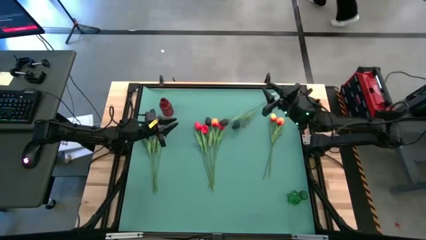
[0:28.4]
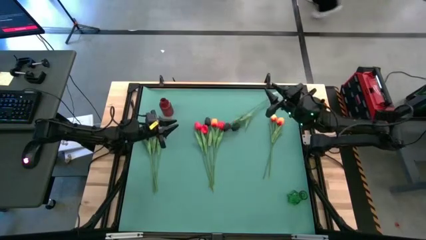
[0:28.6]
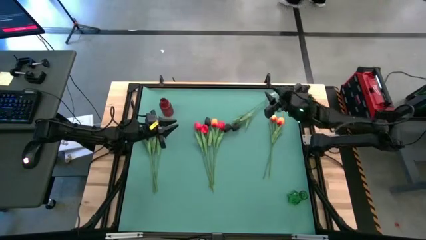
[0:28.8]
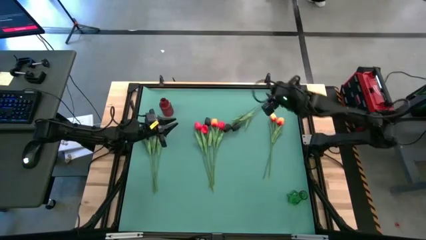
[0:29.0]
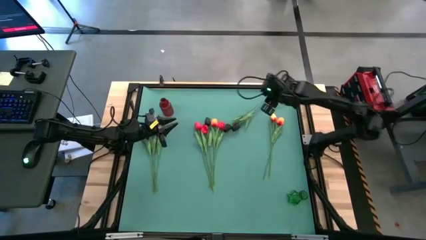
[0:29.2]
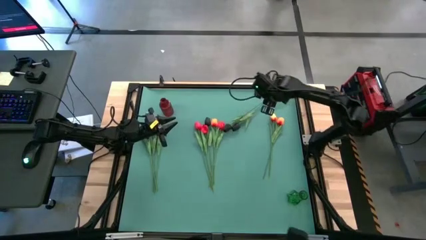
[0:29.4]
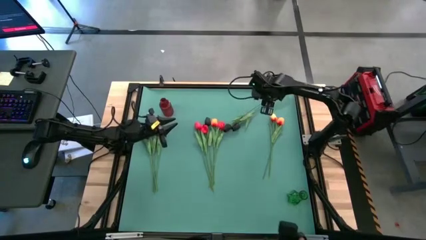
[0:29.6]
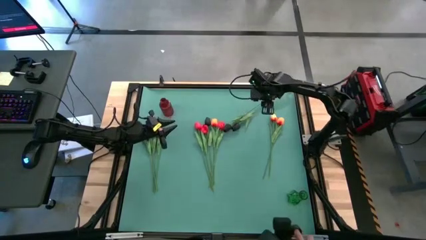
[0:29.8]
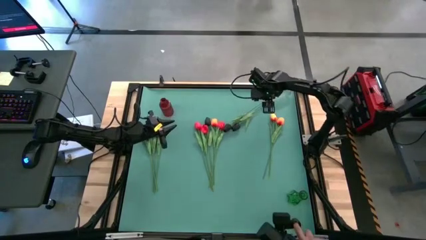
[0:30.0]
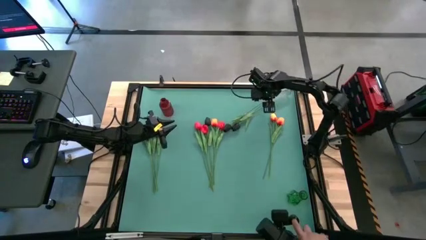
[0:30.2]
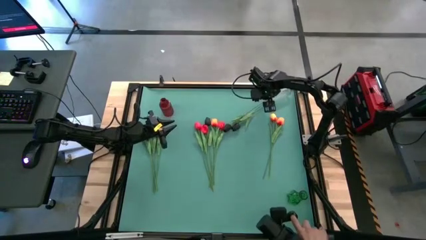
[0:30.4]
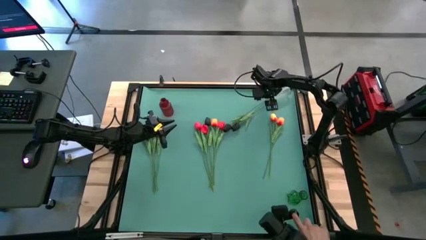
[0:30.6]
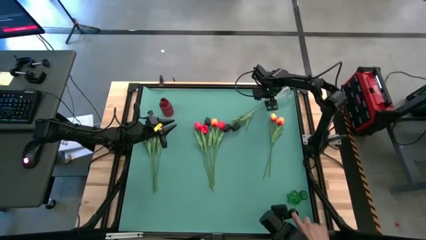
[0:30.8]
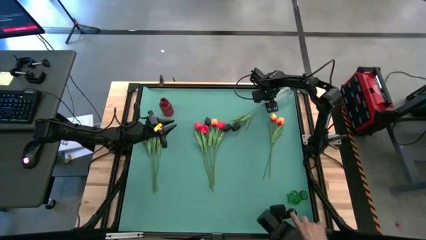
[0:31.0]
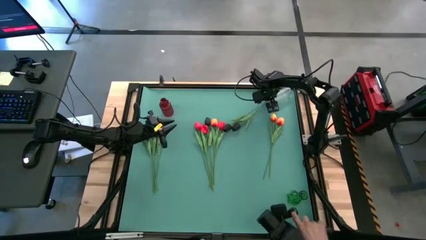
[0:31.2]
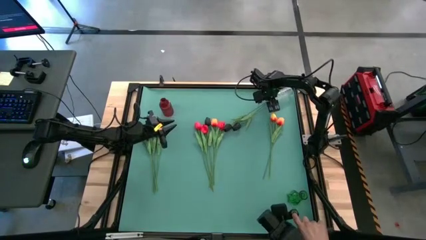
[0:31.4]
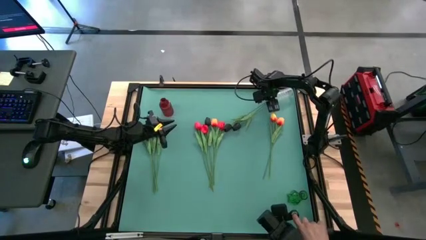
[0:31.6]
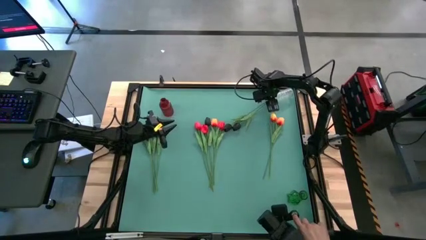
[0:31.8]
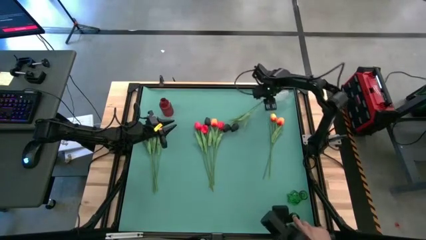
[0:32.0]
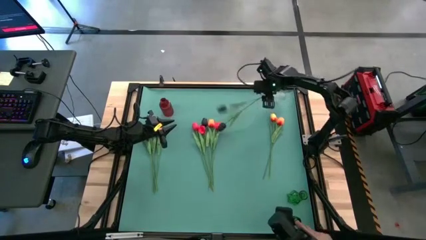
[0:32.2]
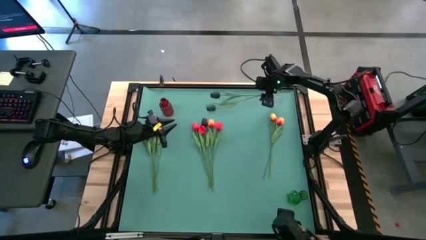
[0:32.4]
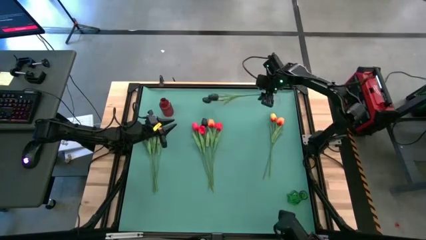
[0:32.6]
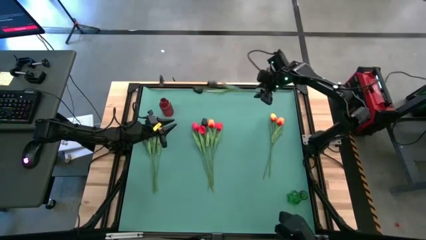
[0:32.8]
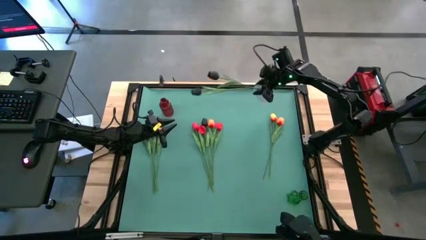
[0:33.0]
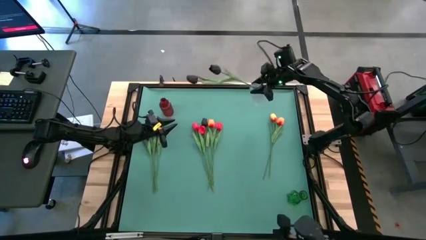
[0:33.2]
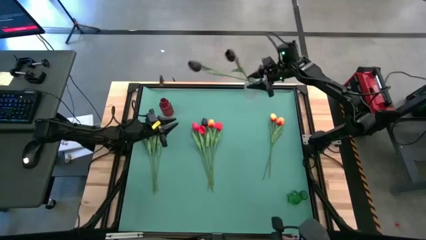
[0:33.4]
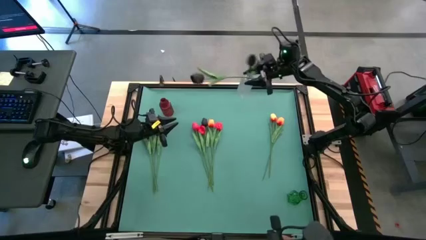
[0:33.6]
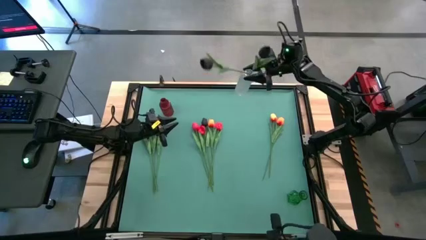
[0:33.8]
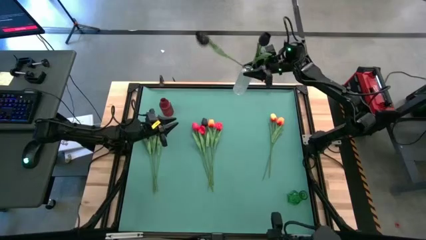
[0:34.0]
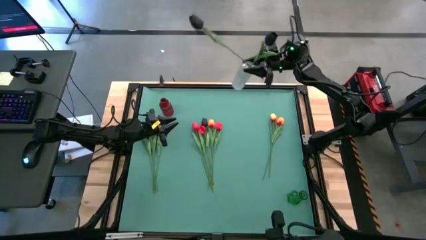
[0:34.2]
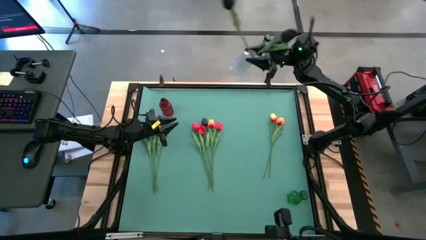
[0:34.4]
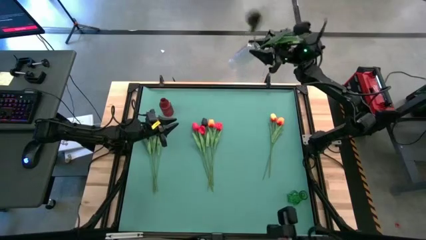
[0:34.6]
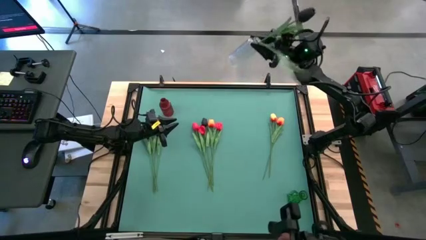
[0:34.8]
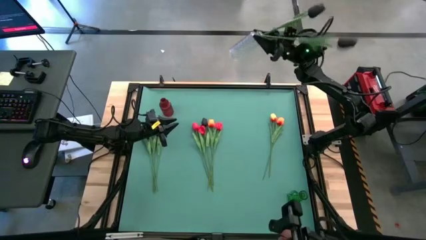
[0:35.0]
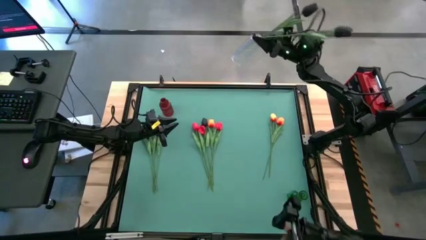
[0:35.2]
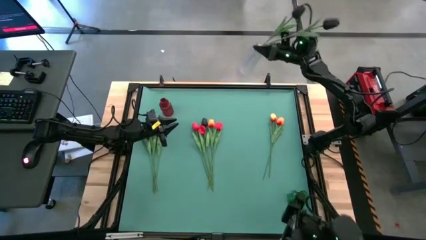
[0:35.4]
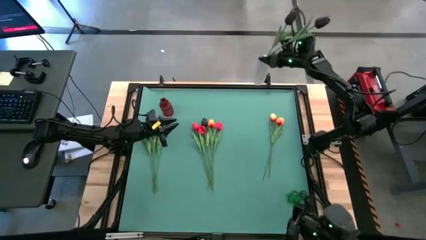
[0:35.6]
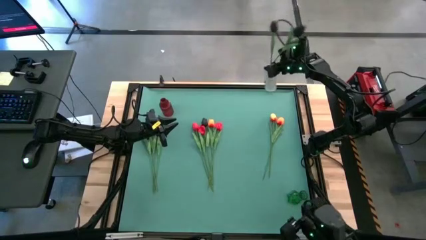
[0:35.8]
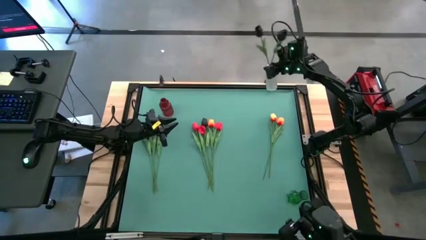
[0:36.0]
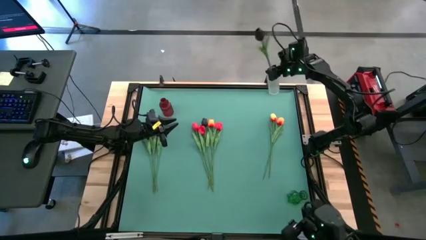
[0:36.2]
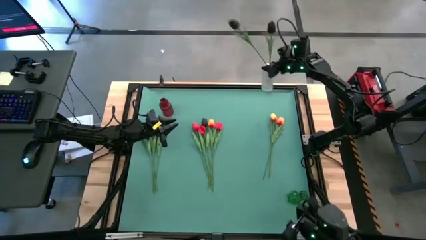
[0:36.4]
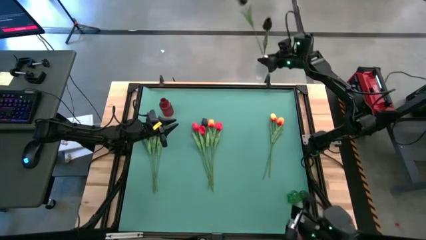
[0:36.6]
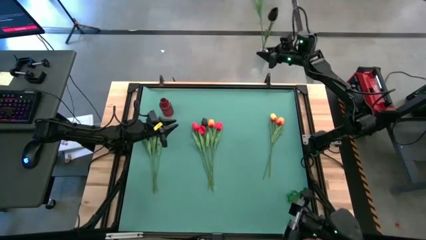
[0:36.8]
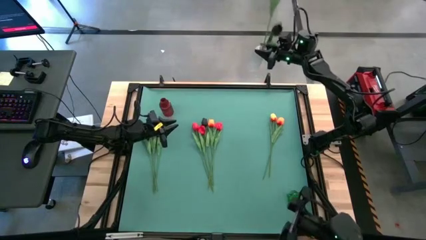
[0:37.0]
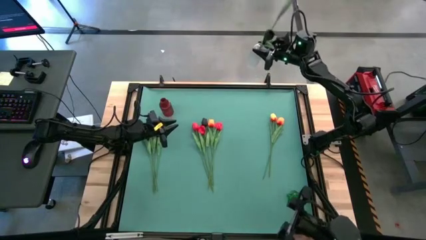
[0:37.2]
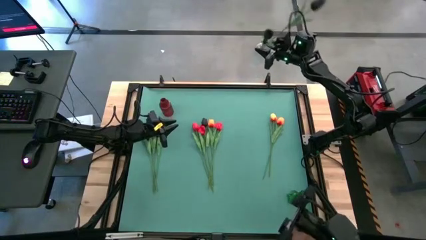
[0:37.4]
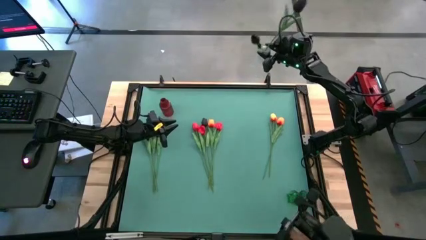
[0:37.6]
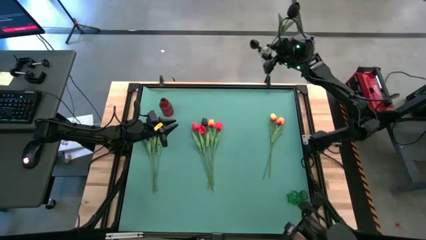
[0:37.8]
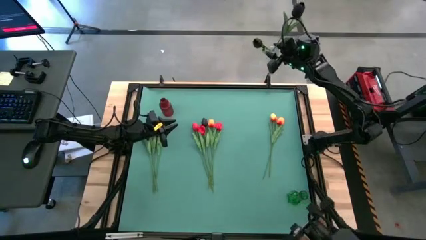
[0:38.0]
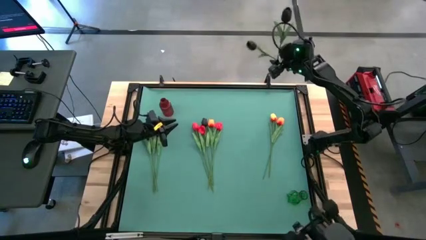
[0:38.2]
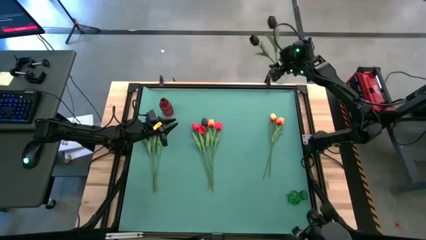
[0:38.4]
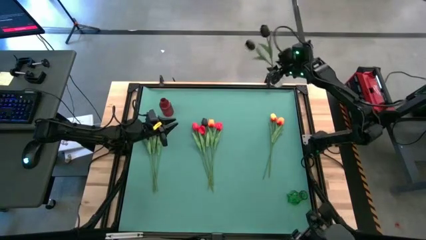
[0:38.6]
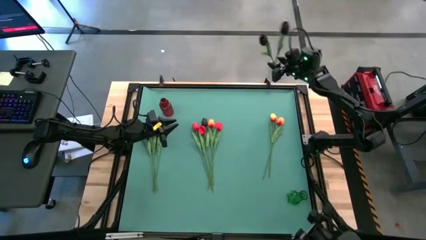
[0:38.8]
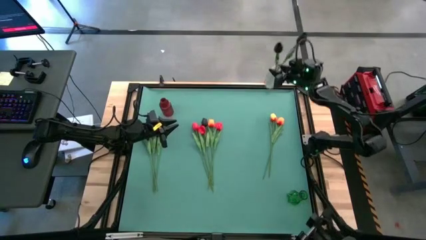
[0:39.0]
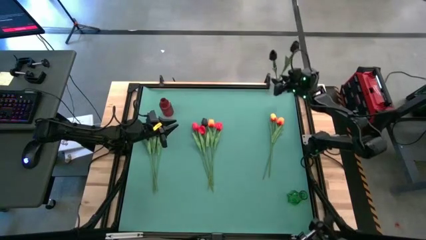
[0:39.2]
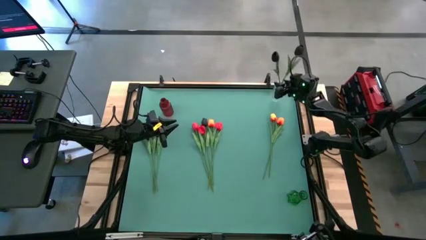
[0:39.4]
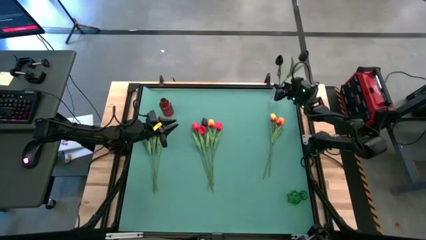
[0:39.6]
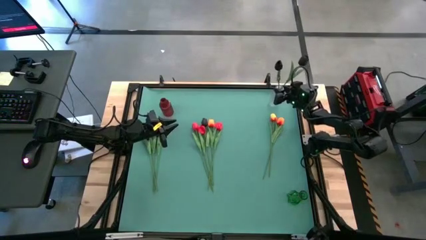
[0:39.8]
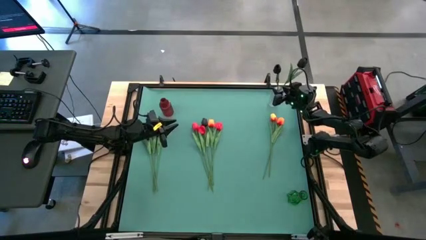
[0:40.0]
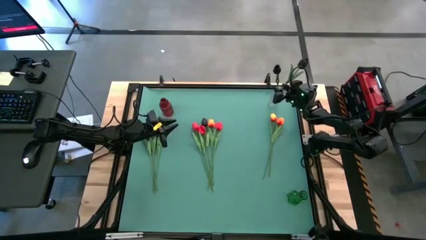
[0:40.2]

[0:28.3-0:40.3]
Task: Sort flowers into vase by color
Adjust the transparent vase on the table
